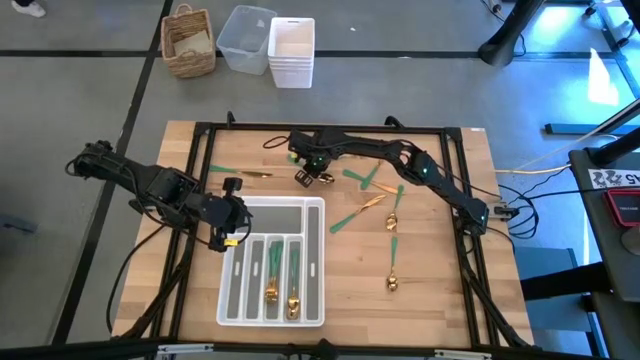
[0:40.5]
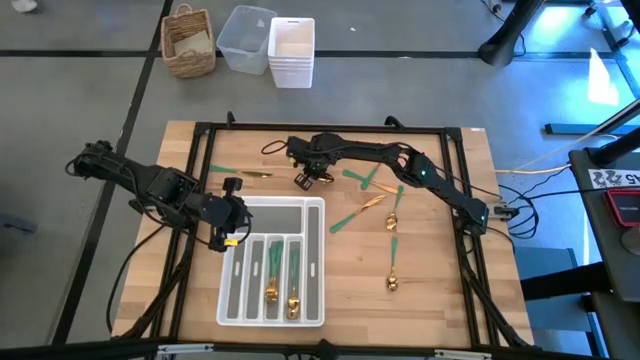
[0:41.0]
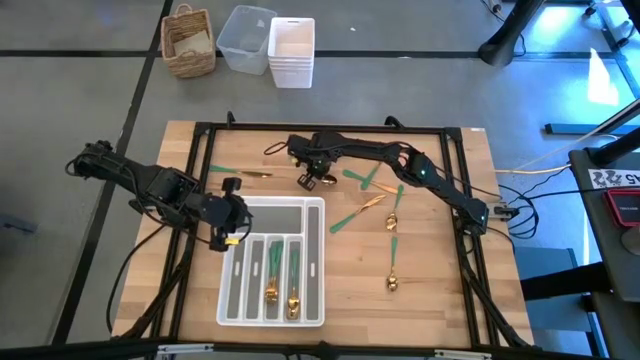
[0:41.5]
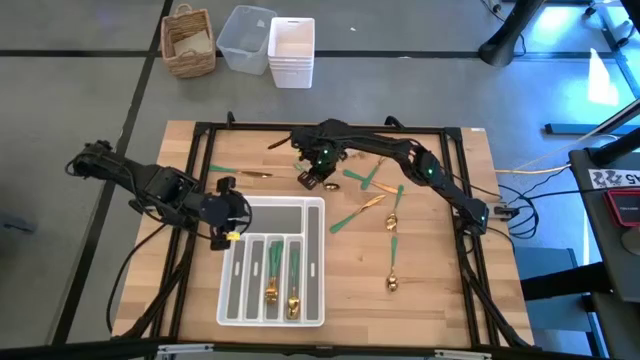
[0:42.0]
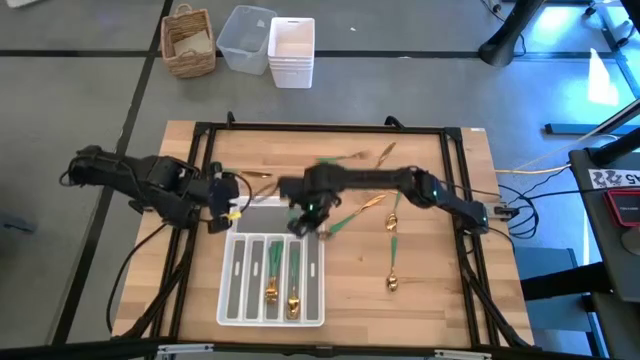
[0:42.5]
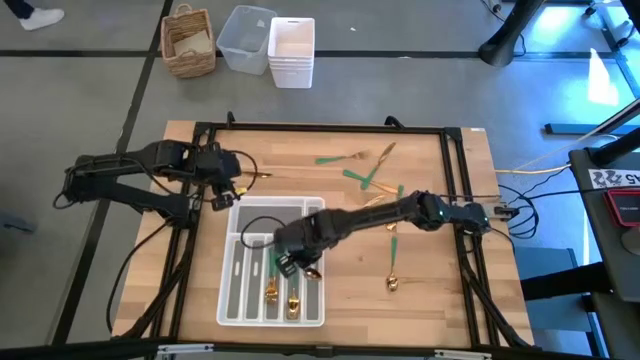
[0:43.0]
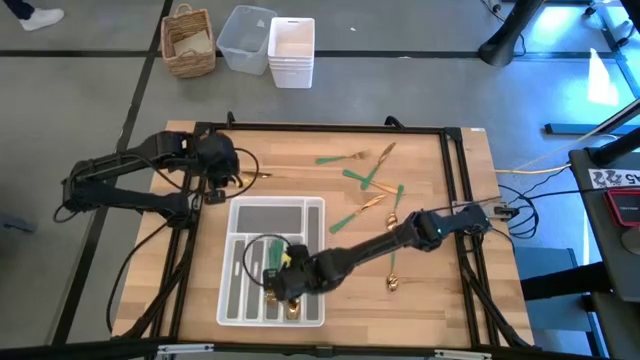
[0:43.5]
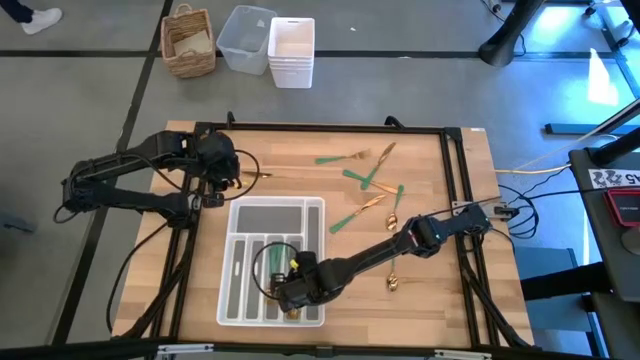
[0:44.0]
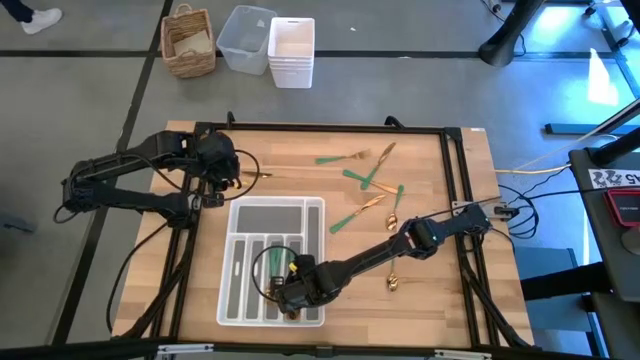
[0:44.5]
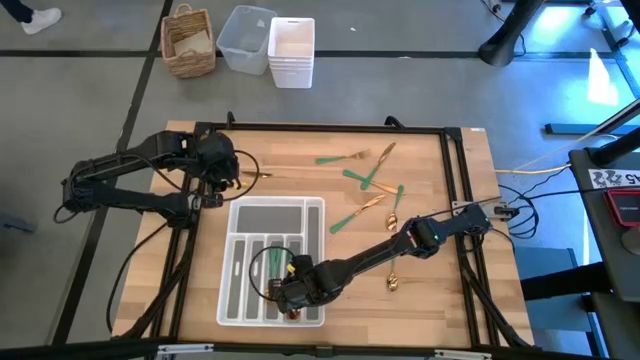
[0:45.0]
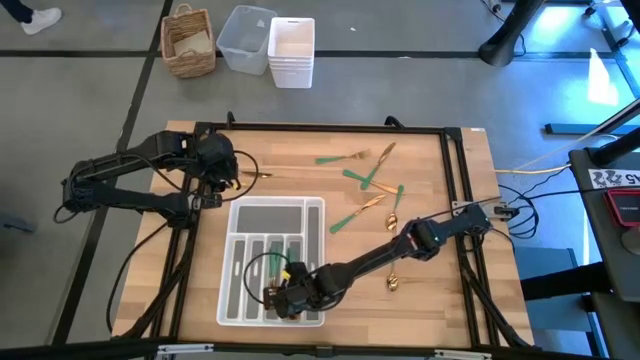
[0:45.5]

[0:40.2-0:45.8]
Task: Sort silverware
Put the spoon in the silverware tray

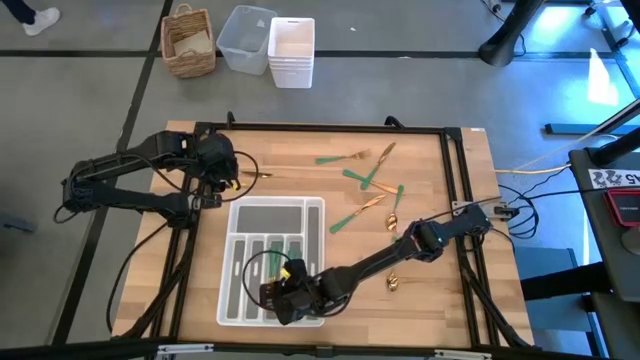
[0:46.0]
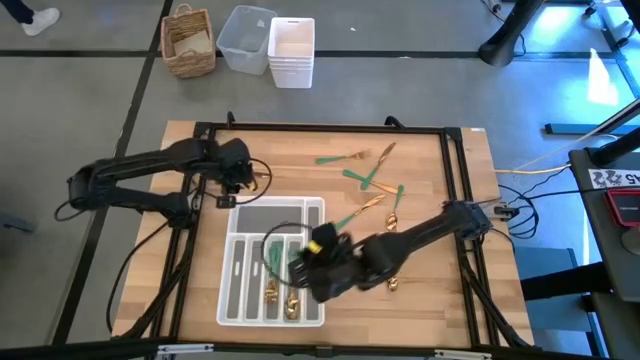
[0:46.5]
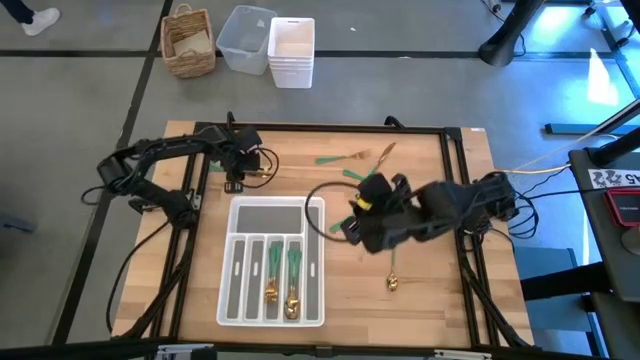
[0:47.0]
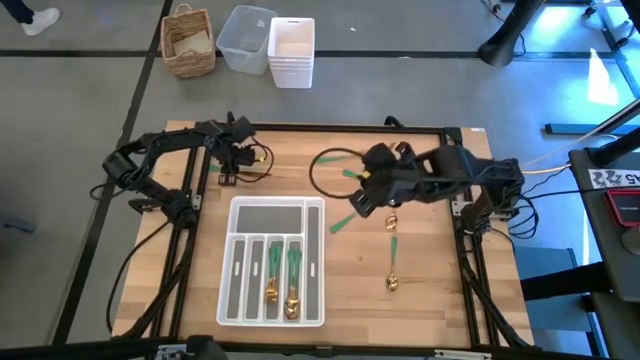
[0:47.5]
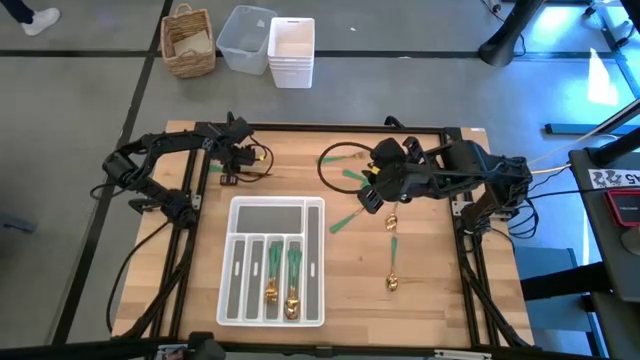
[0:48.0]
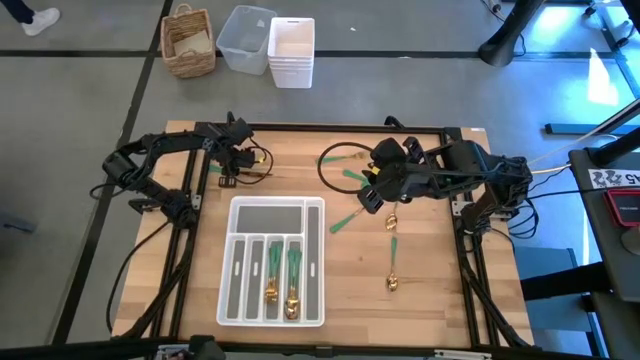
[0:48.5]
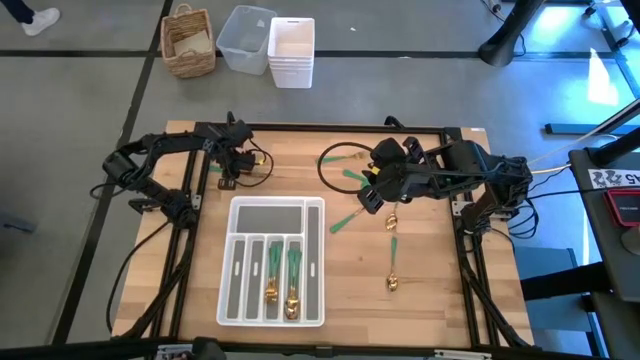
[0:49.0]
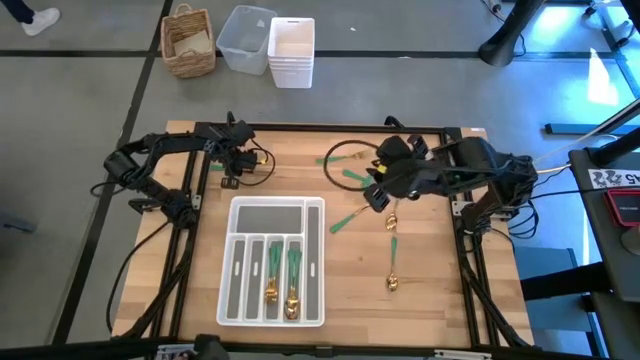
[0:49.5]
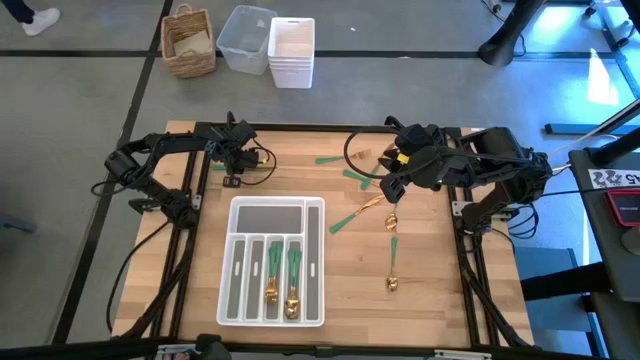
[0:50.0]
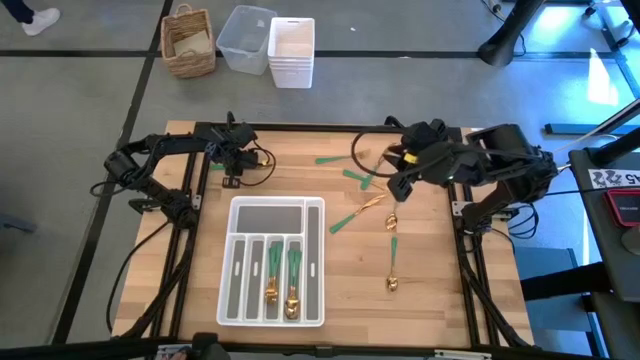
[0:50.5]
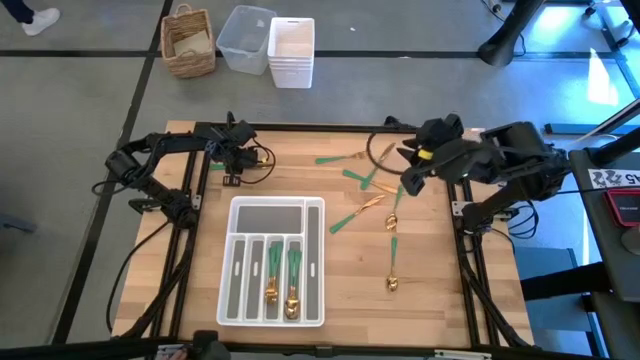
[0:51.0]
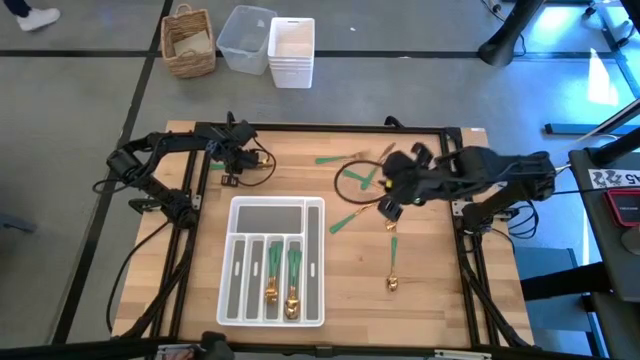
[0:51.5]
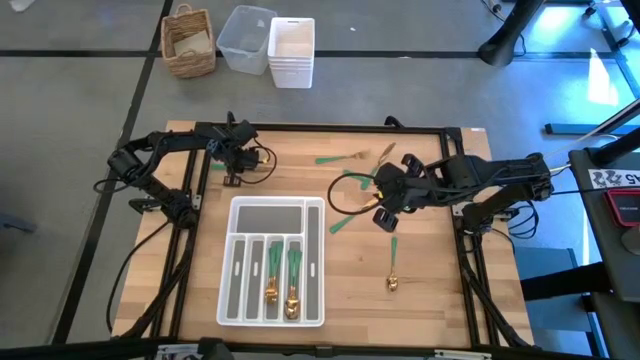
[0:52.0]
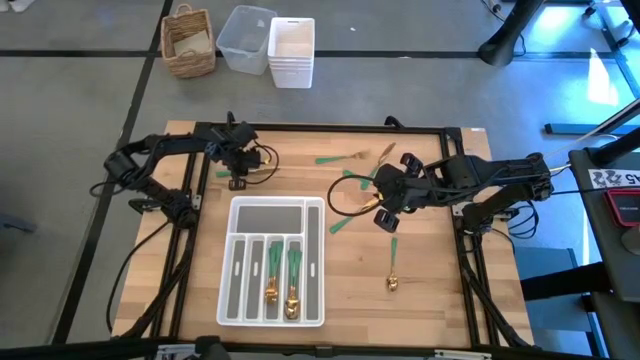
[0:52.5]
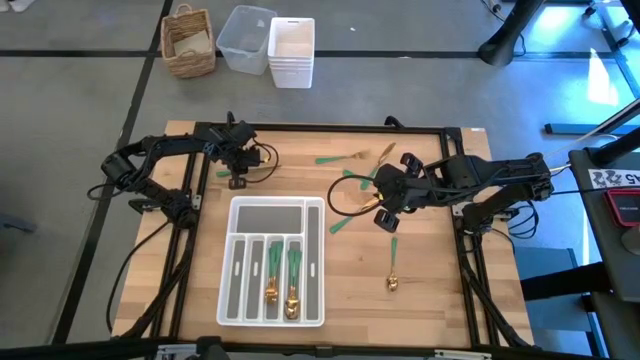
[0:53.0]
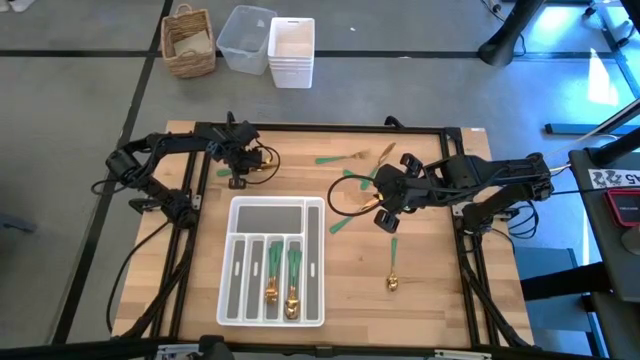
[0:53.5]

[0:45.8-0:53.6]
Put the table knife in the silverware tray

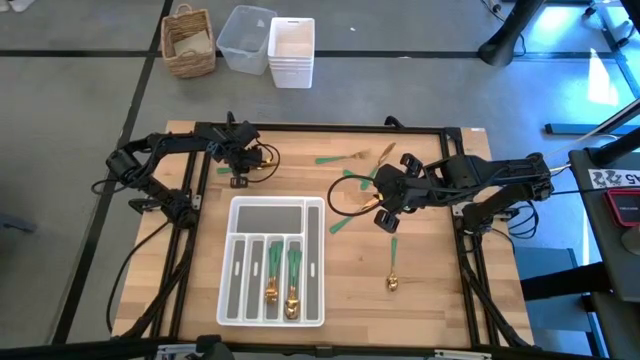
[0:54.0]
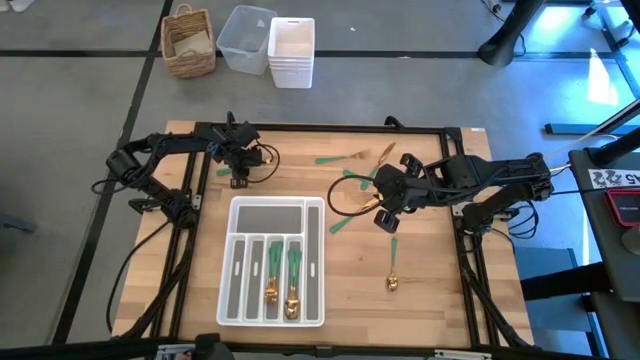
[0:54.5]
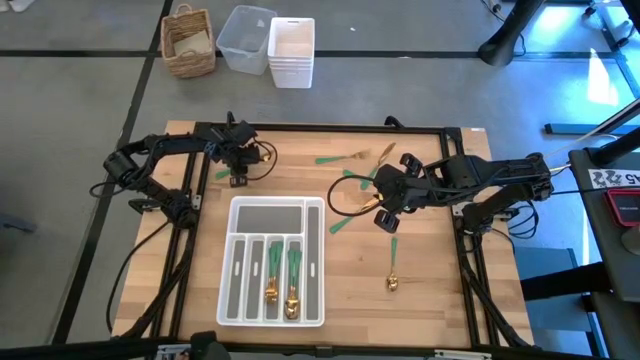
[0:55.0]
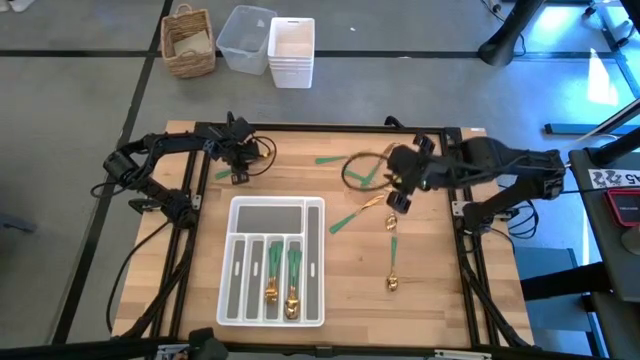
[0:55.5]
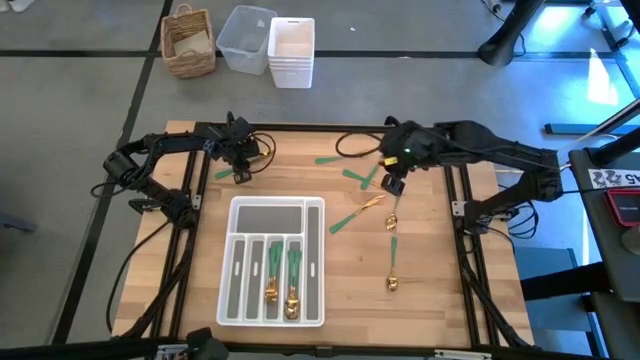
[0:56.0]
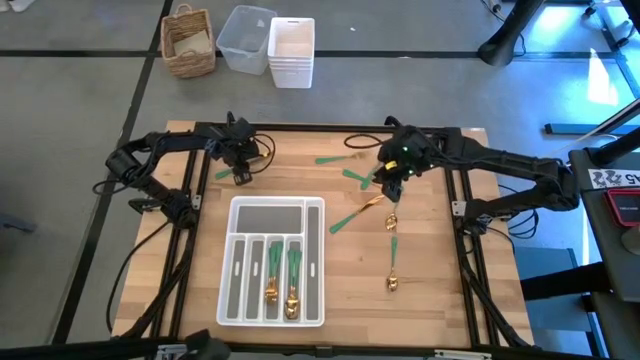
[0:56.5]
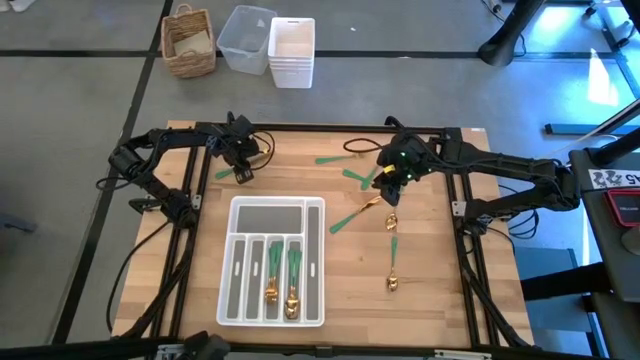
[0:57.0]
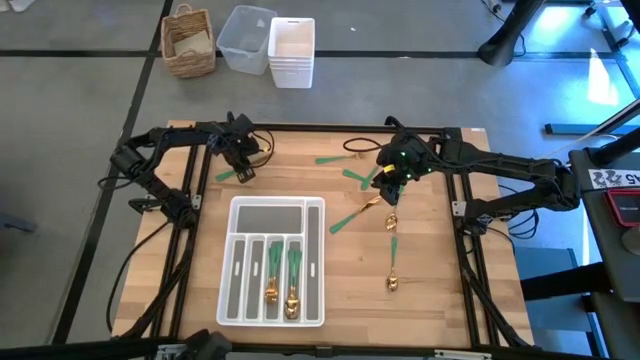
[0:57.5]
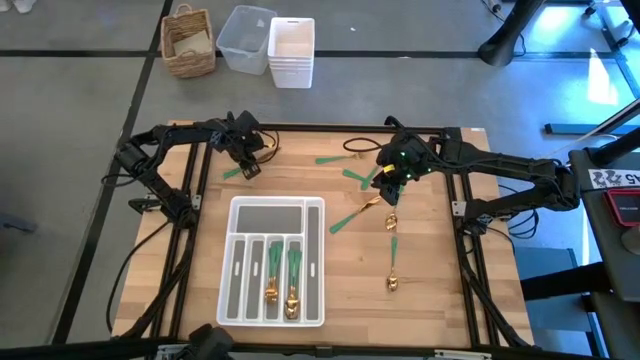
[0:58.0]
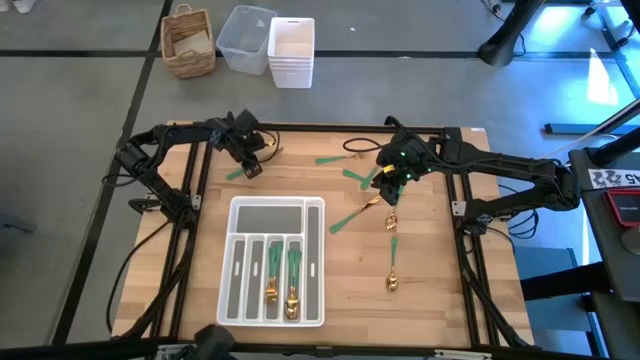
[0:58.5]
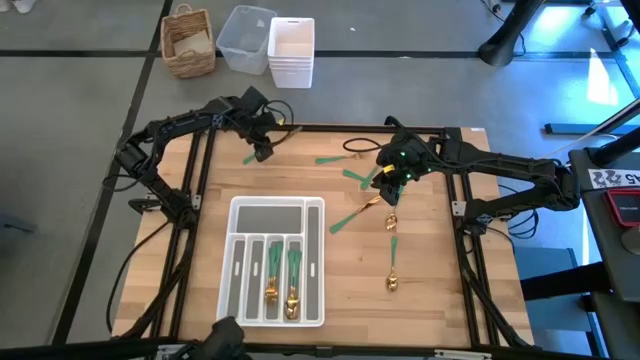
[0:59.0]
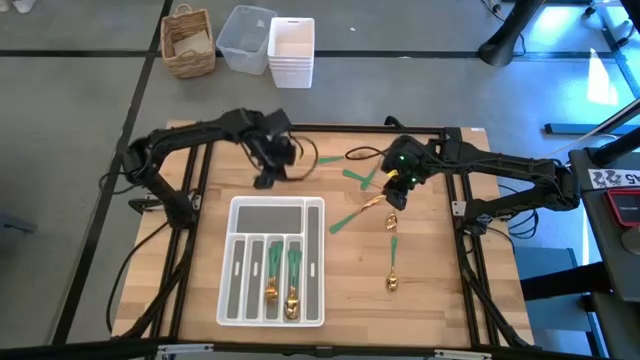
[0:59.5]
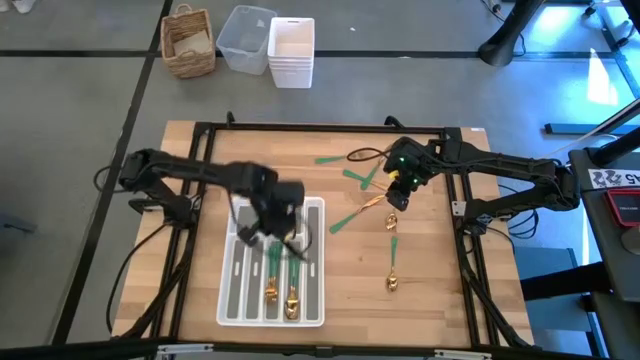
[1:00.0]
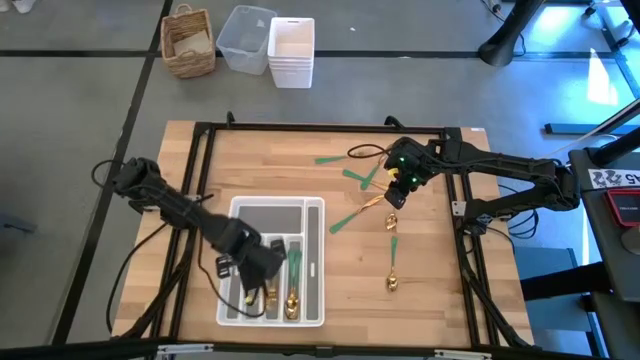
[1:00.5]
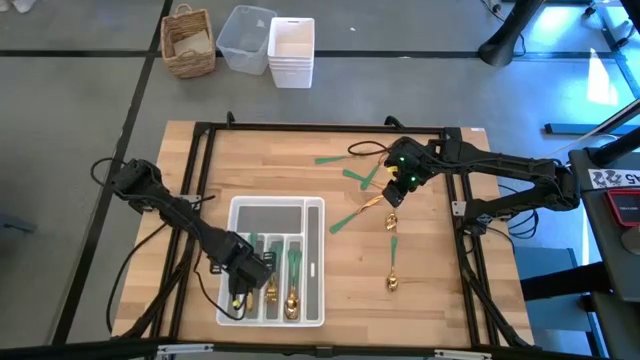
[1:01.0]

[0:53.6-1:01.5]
Put the table knife in the silverware tray

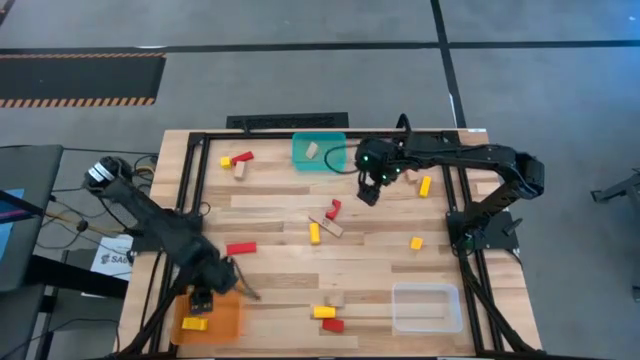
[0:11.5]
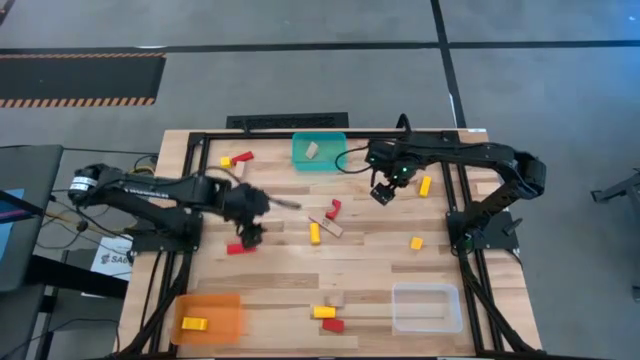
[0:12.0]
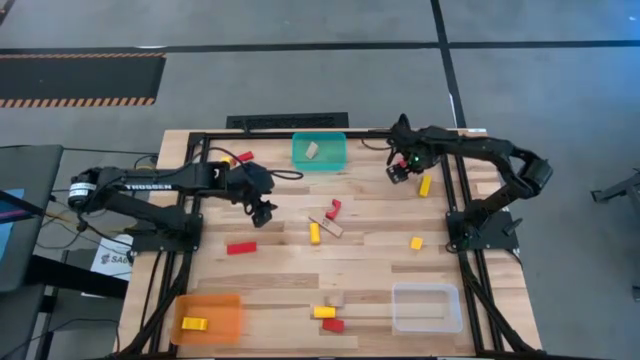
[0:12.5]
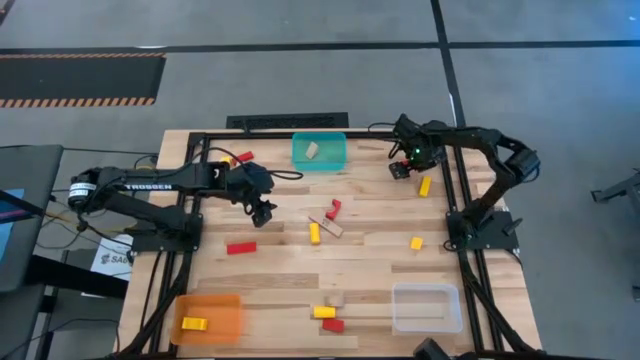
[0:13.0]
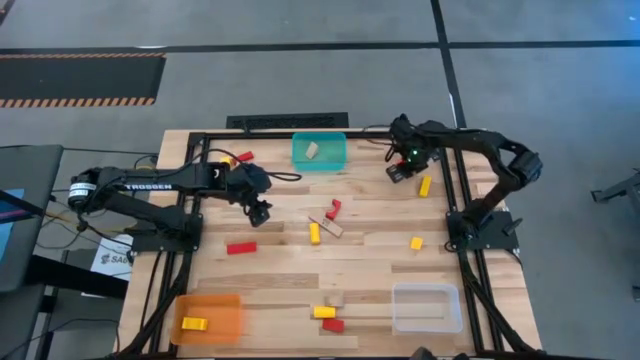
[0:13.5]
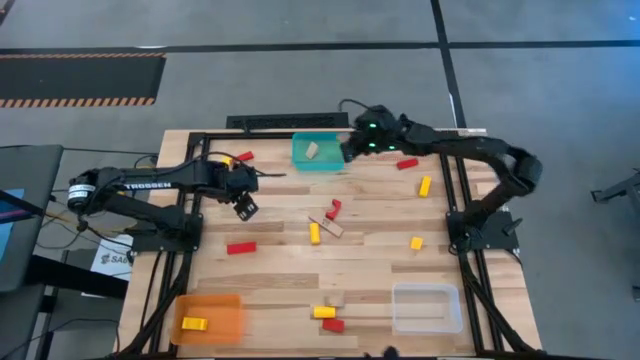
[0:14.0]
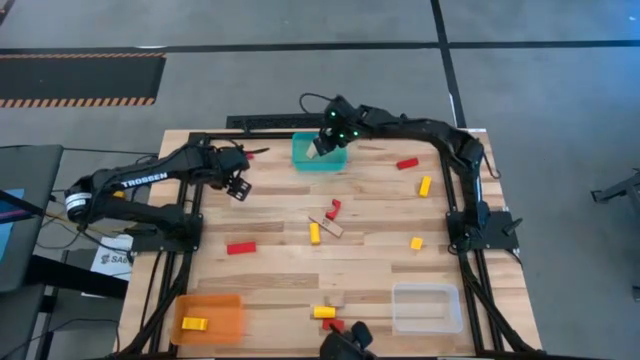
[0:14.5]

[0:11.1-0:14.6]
Task: Sort & place blocks by color
Put the light brown block into the blue bin
